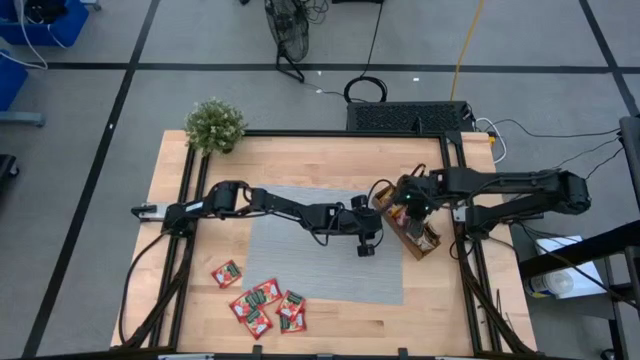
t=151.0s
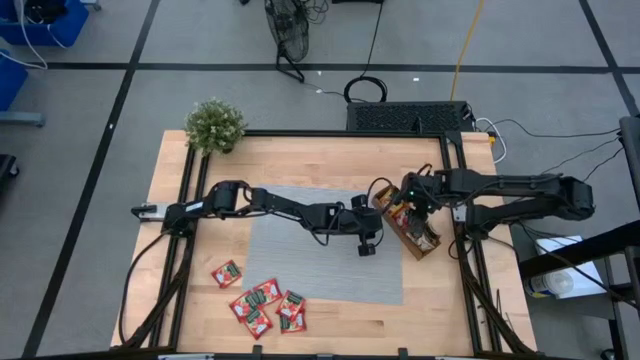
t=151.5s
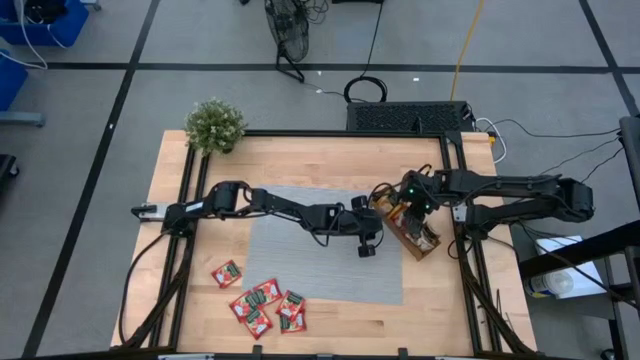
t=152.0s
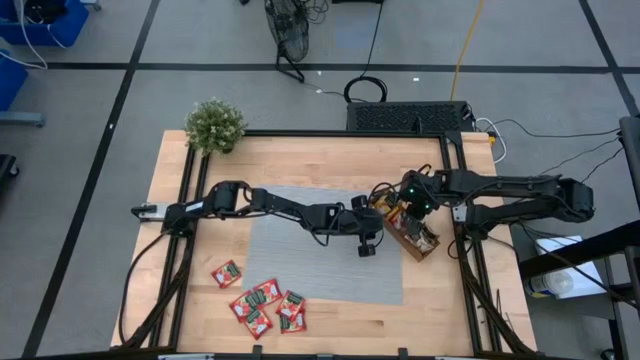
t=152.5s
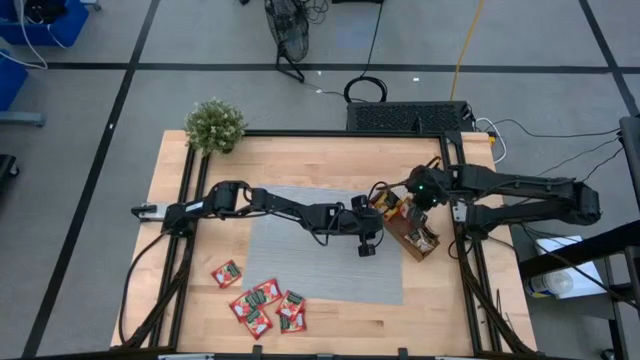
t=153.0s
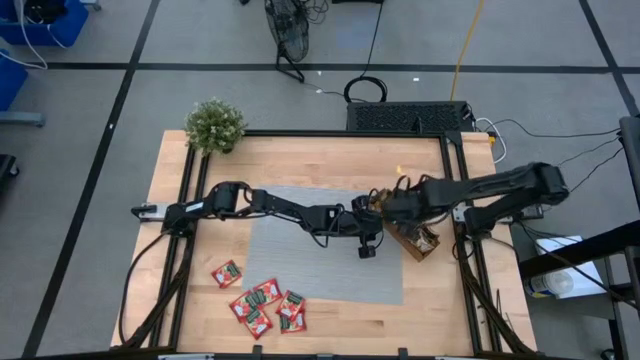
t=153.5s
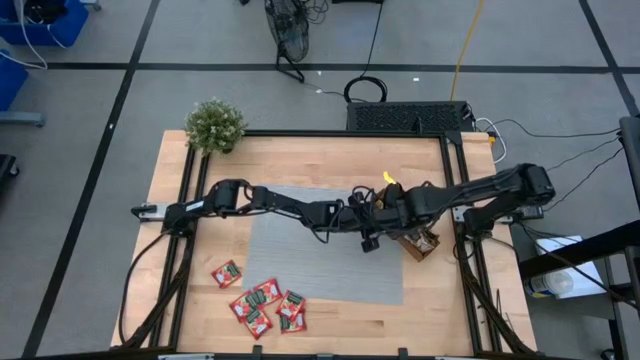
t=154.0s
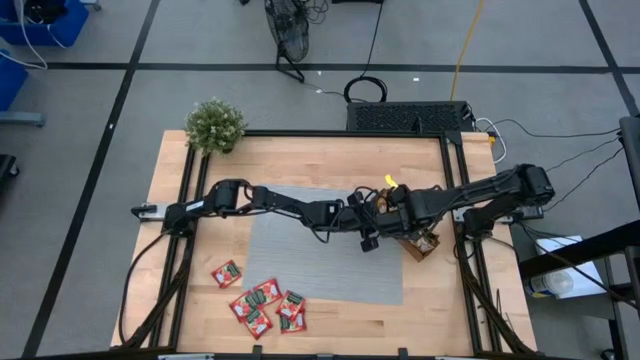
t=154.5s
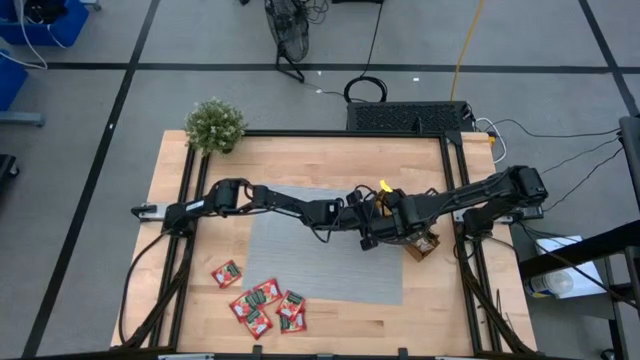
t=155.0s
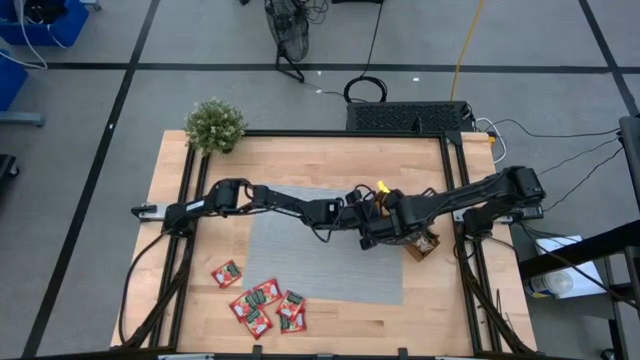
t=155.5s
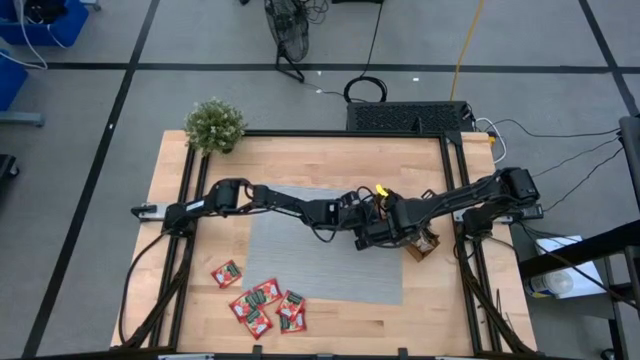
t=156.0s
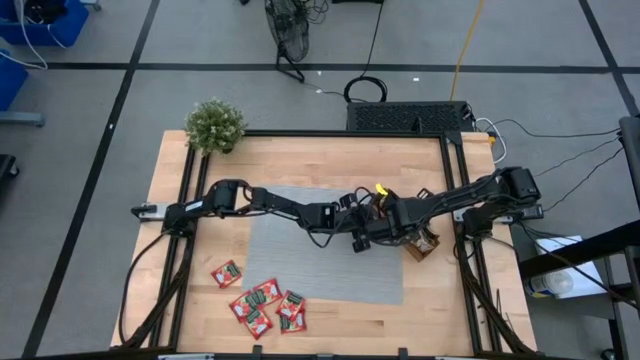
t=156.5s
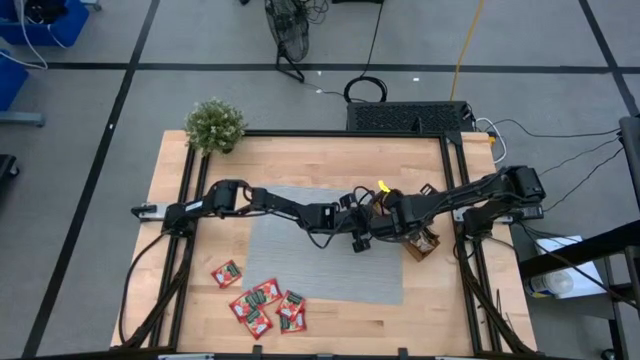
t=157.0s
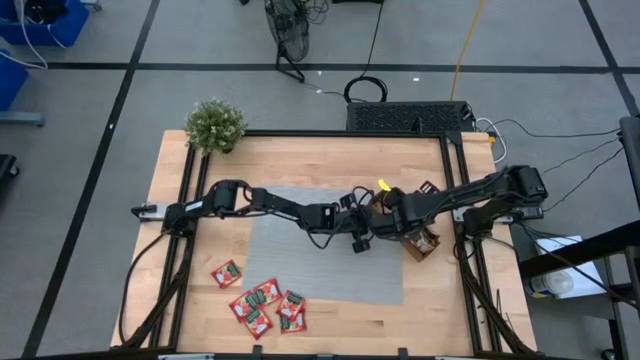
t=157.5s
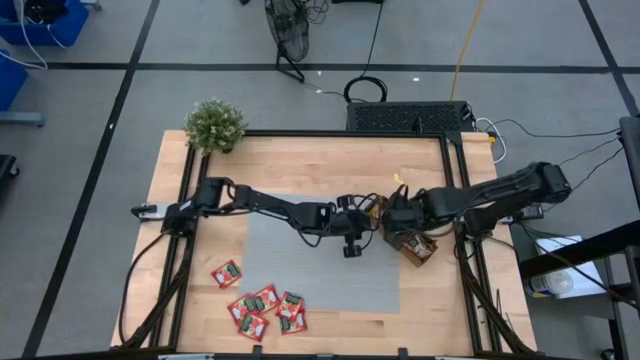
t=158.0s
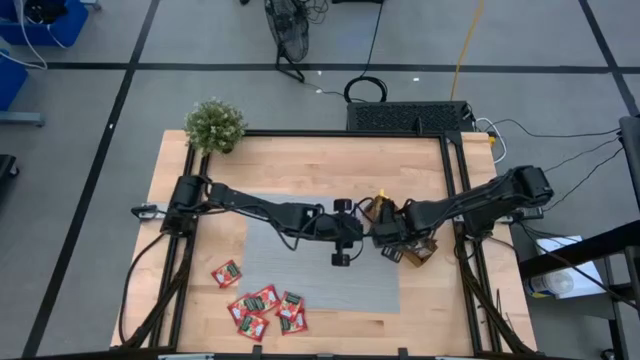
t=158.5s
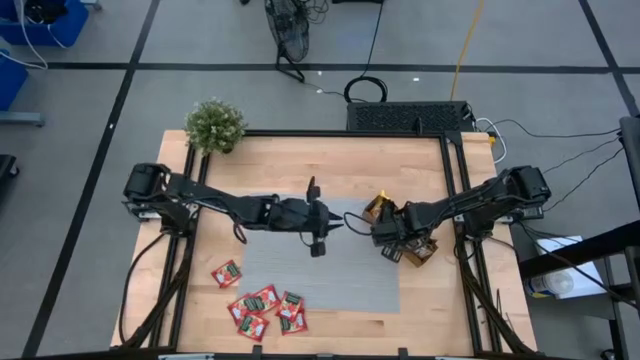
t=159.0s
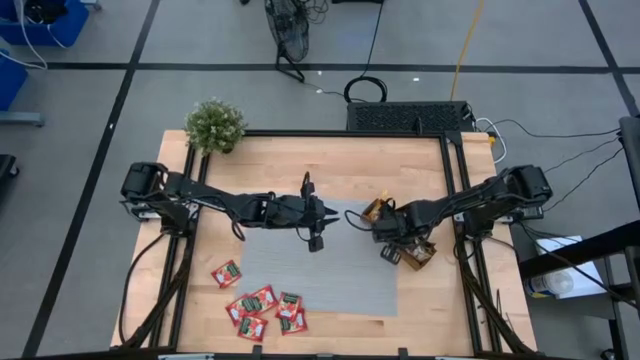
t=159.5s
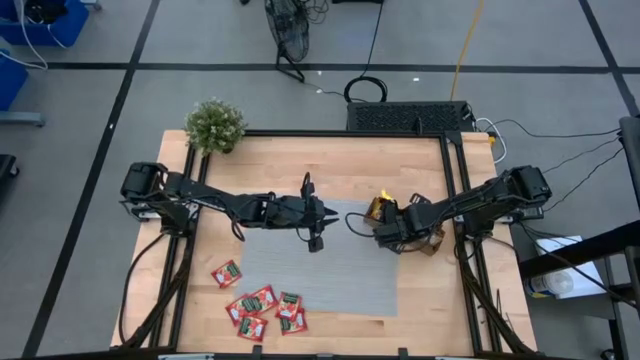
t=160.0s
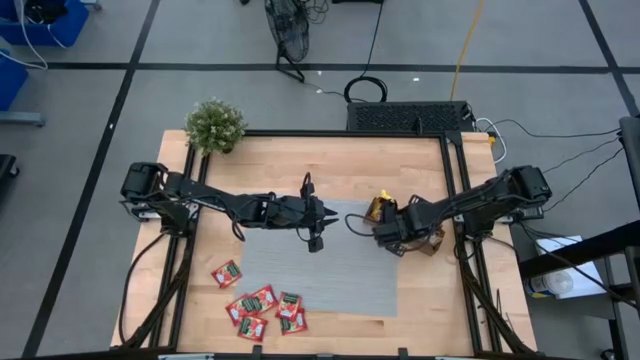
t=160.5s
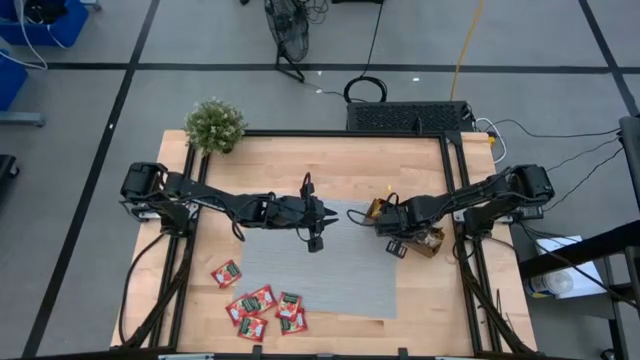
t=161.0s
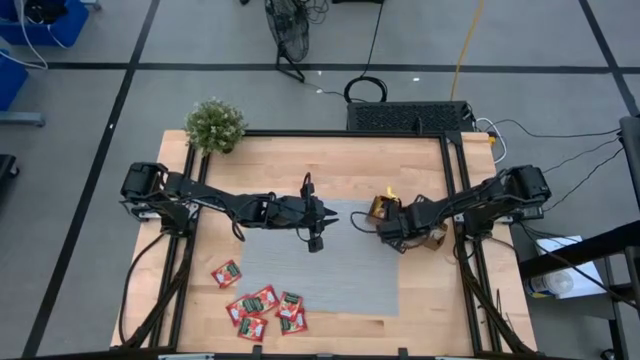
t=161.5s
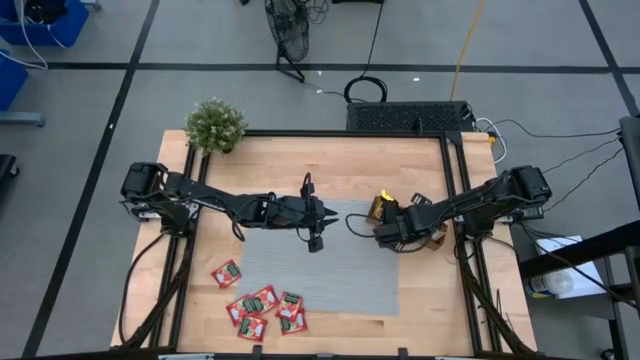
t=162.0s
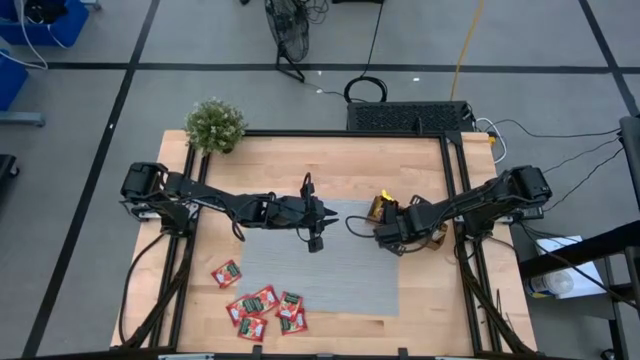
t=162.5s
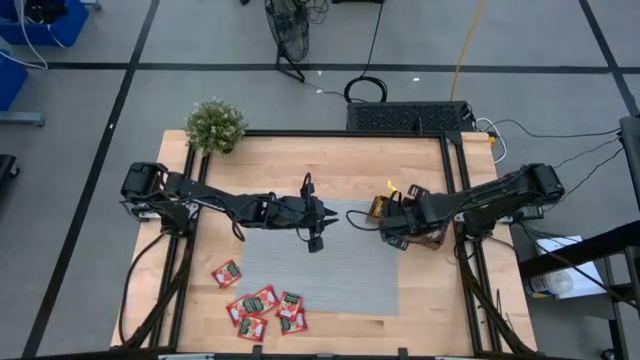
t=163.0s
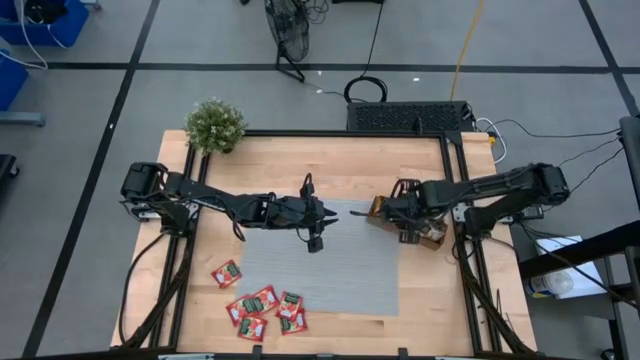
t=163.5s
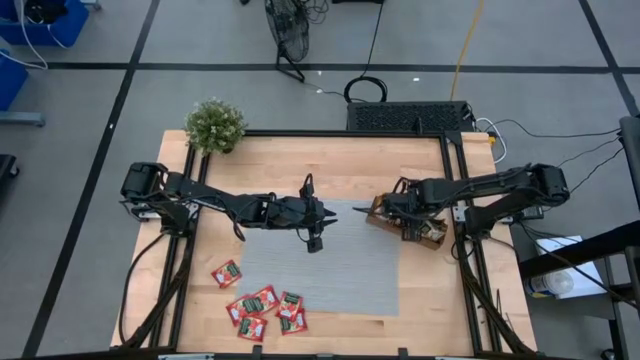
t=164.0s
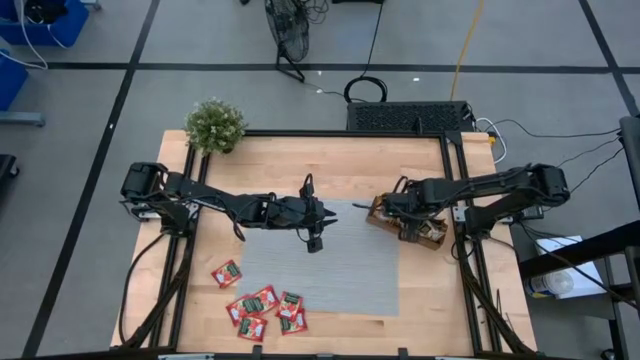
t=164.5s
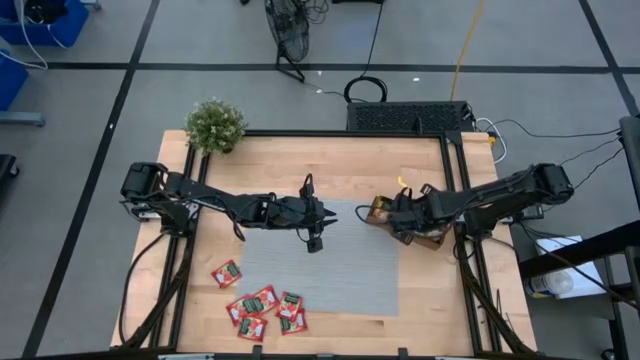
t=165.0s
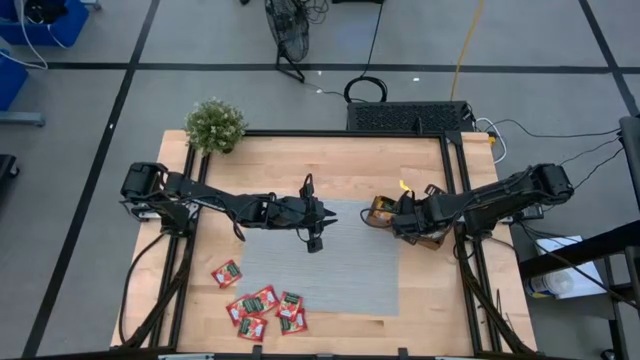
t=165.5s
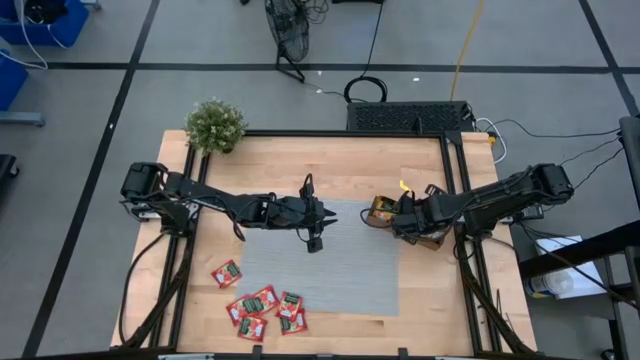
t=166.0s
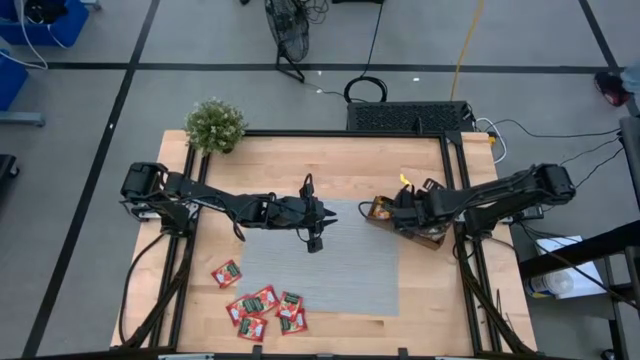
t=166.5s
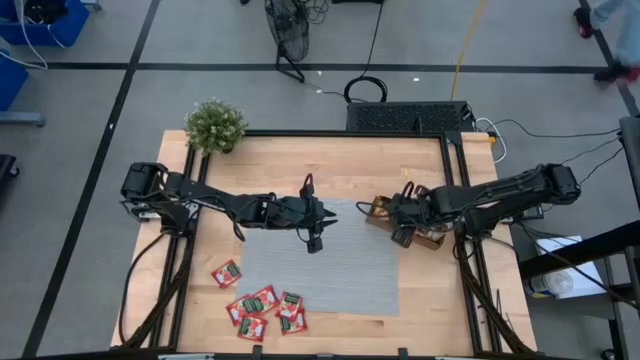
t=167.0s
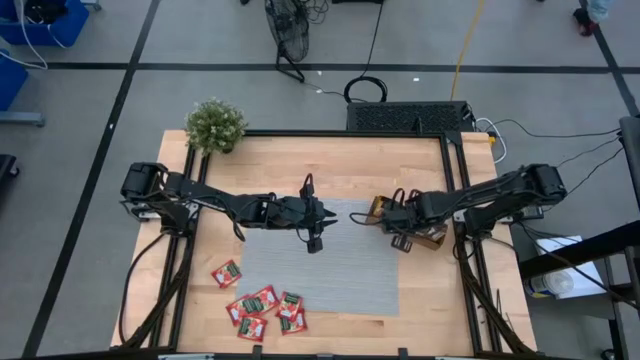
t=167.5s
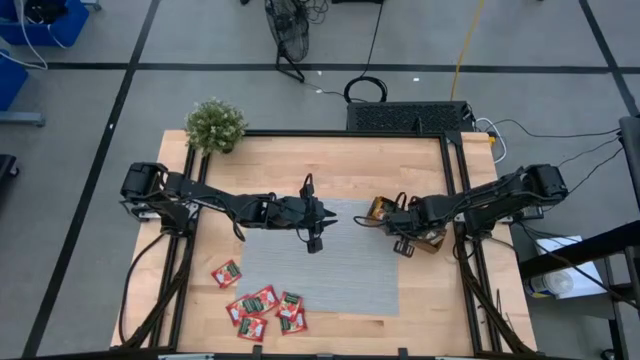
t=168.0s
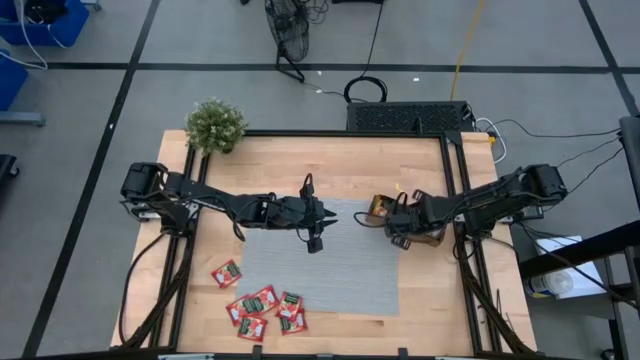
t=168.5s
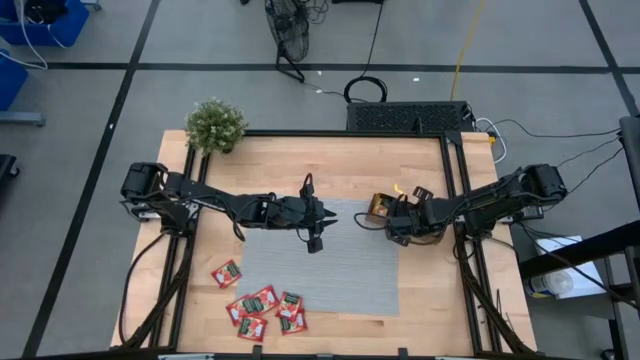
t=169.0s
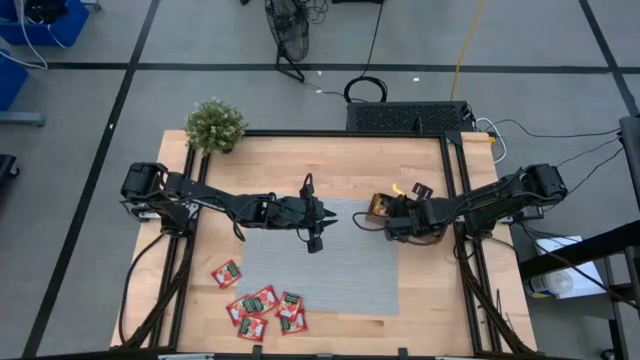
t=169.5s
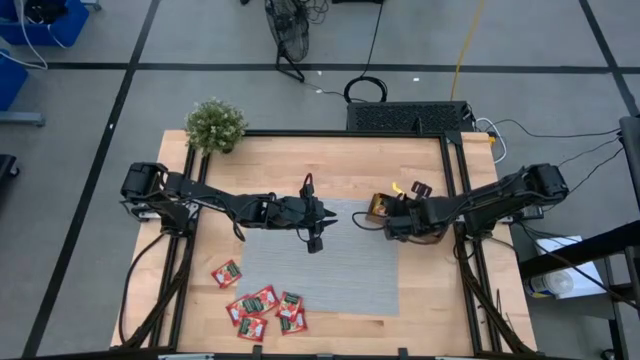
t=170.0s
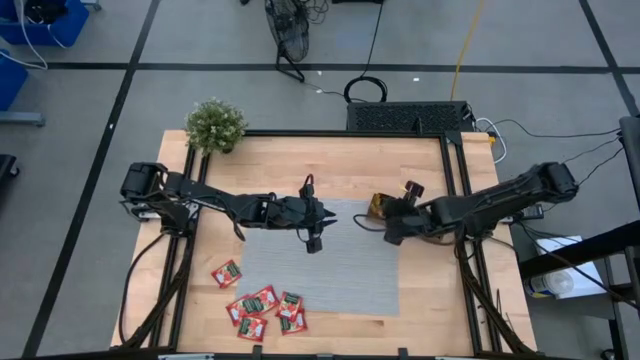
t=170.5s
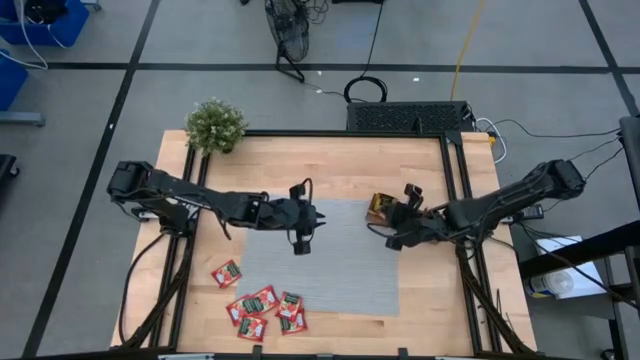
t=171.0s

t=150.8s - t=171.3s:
Task: Pick & Place Tea
Put the red tea bag into the middle section of the wooden organizer
